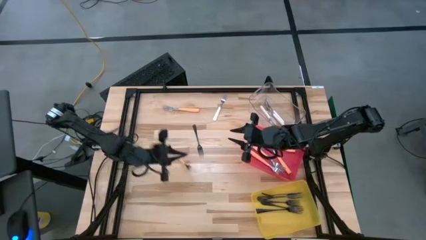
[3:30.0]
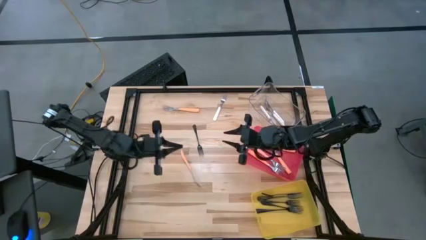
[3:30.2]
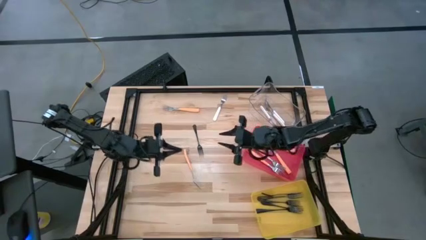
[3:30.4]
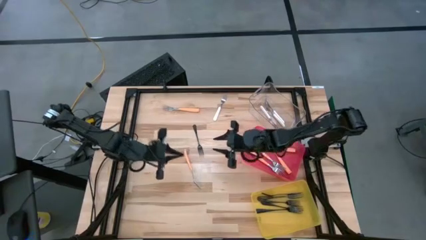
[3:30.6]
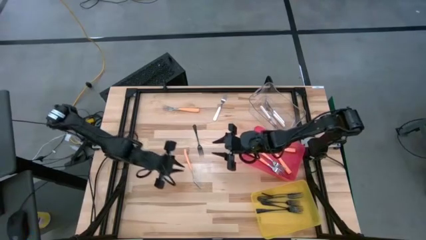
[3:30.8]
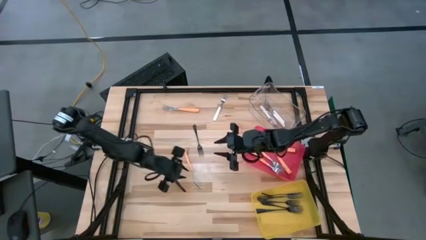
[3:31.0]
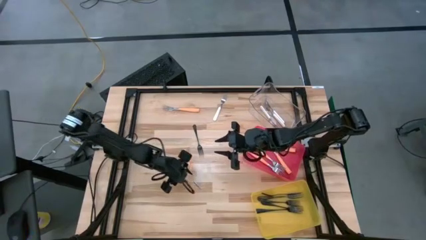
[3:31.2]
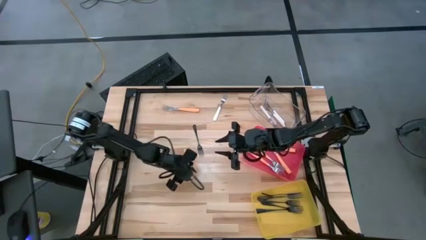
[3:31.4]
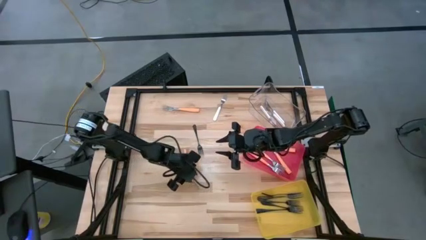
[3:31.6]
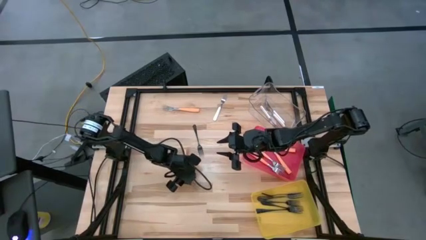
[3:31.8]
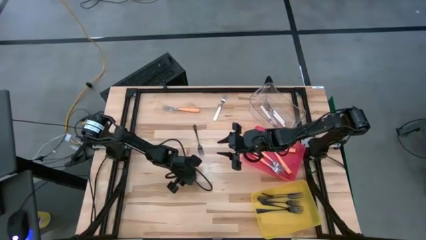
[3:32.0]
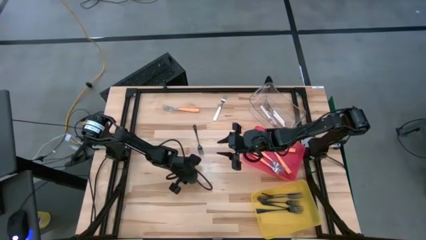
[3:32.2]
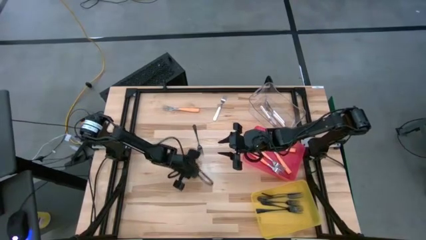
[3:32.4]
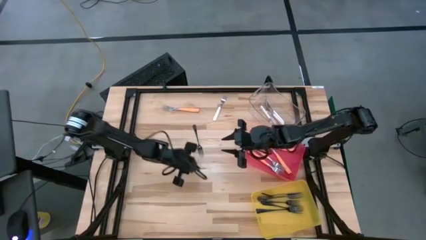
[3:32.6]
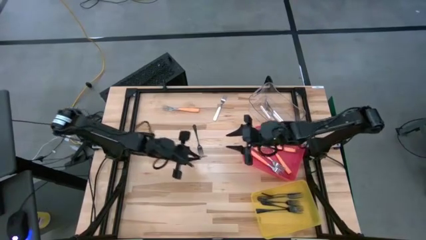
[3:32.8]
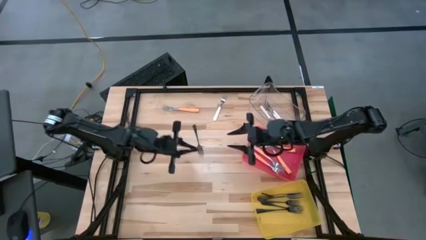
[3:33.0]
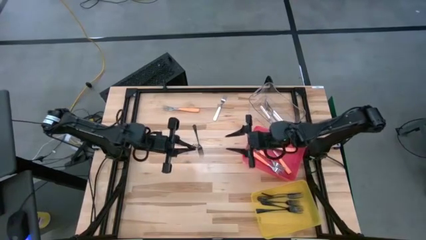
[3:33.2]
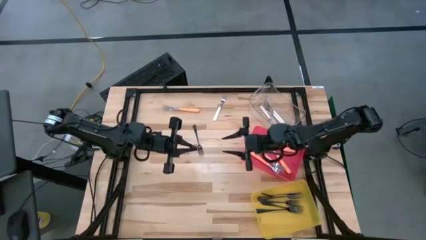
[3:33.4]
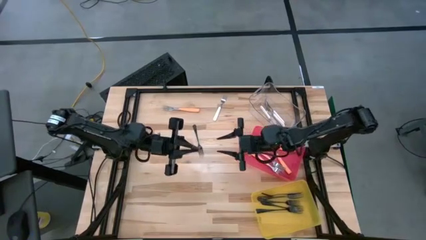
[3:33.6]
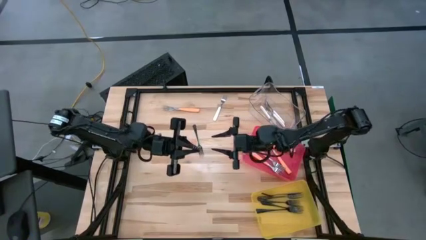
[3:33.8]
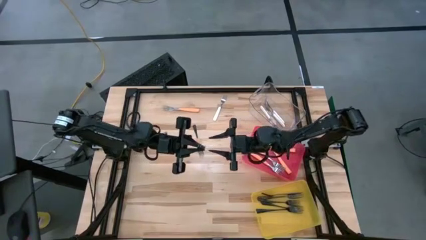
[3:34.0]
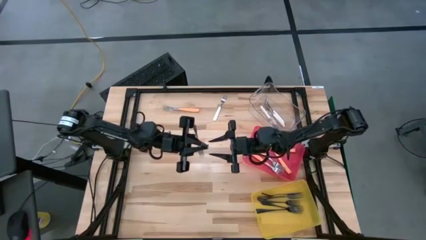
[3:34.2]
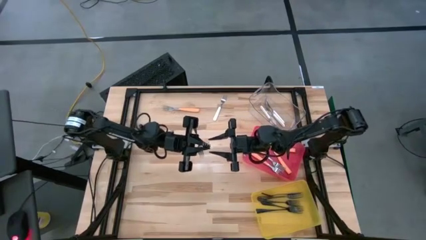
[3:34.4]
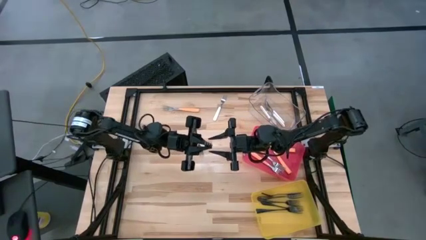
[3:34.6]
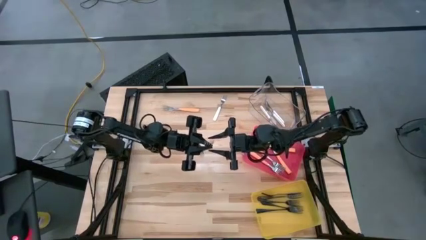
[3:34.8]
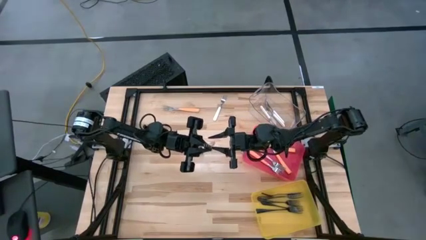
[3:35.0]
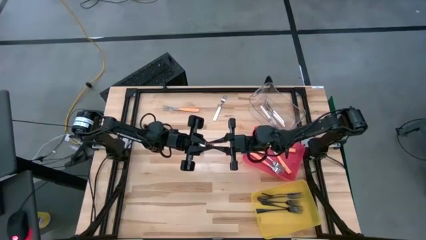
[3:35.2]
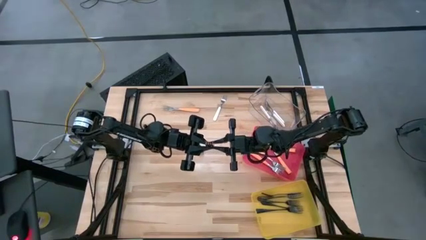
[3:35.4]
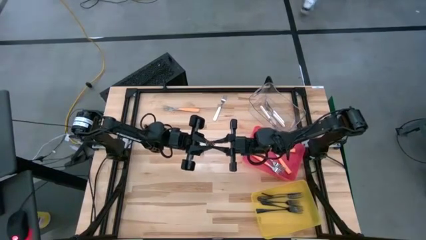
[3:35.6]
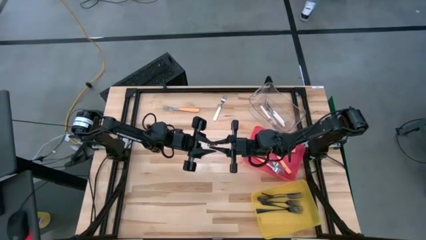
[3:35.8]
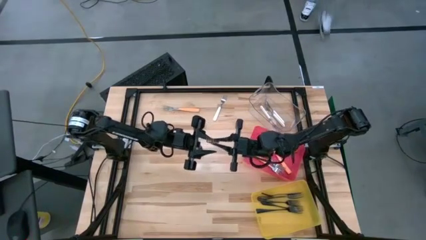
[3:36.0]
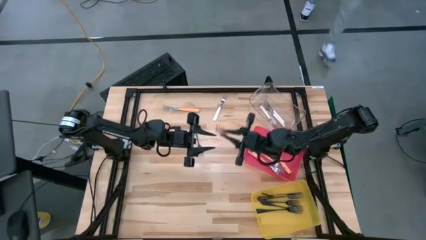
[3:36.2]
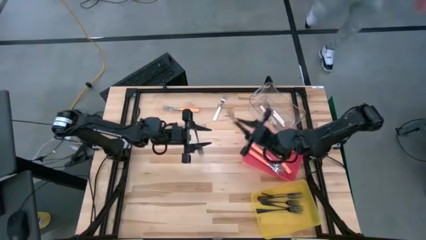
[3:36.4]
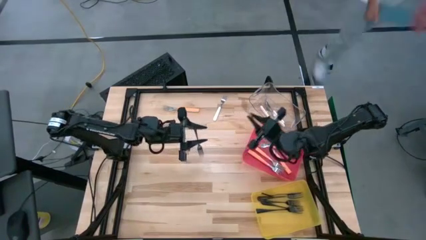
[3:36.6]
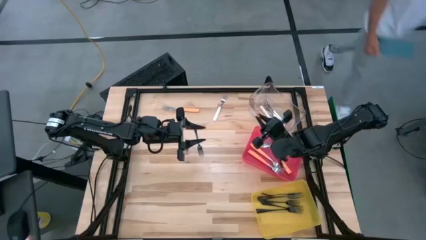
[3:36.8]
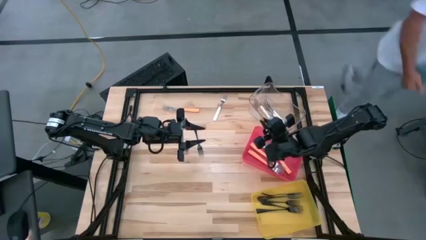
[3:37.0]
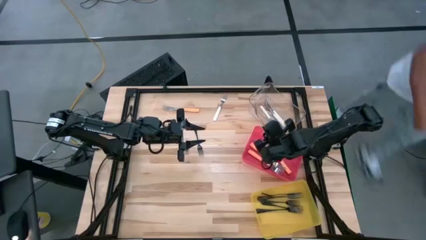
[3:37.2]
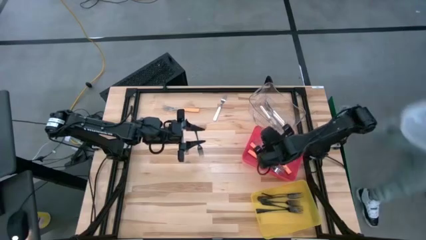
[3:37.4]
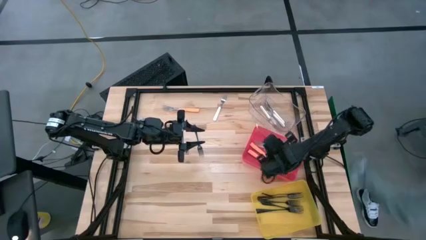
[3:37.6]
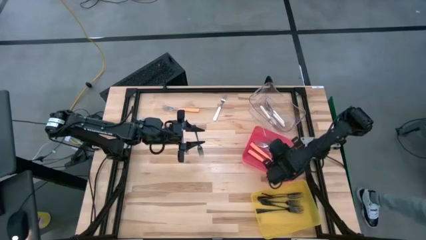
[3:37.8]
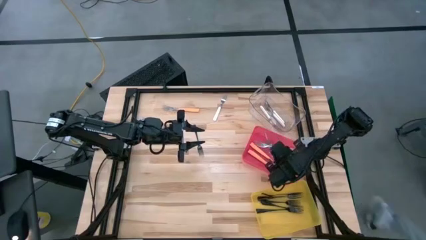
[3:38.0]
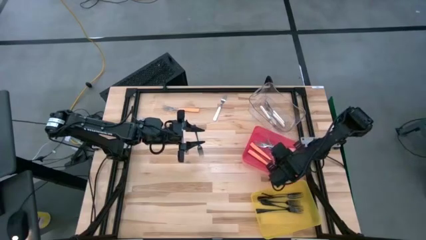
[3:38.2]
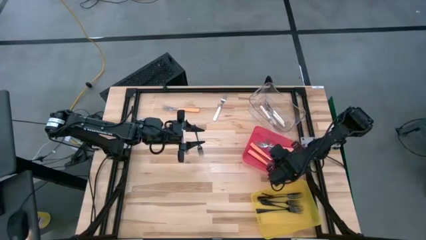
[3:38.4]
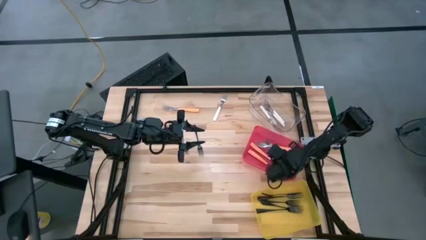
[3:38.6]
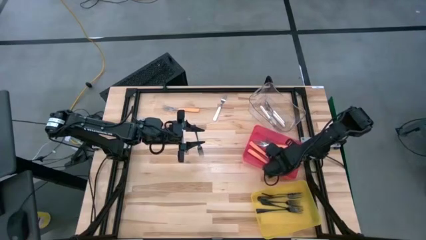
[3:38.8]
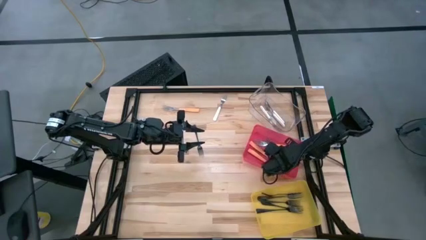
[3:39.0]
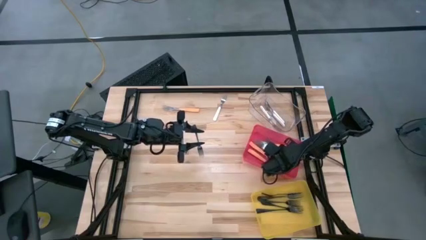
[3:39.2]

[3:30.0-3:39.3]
Task: Sort silverware by color (type)
Put the orange fork into the red bin

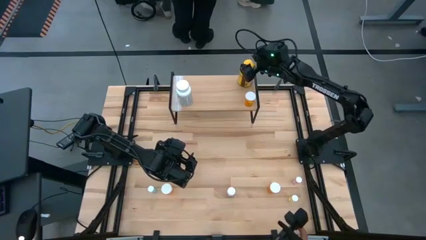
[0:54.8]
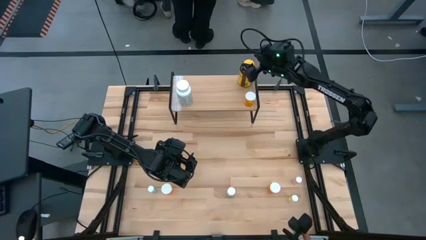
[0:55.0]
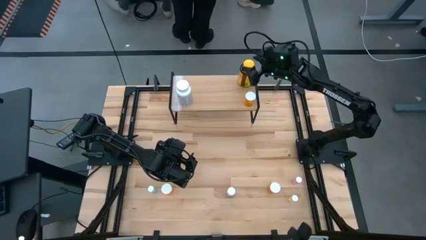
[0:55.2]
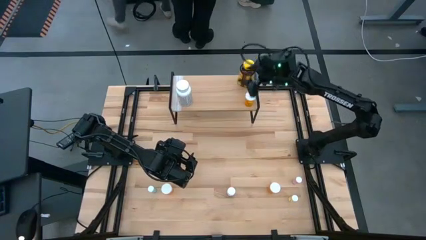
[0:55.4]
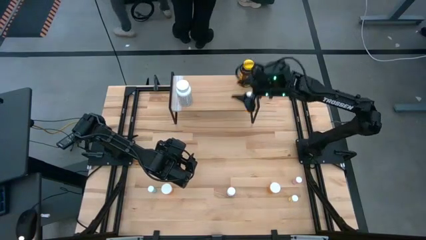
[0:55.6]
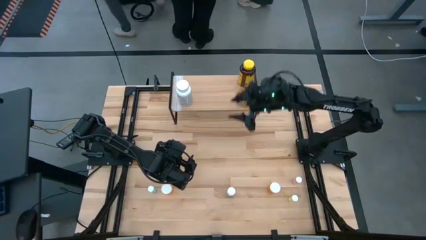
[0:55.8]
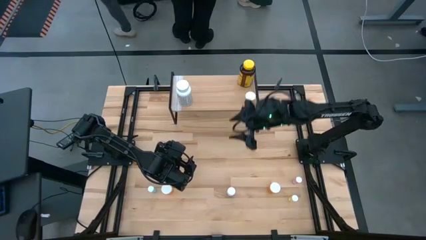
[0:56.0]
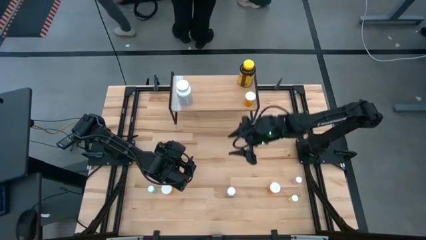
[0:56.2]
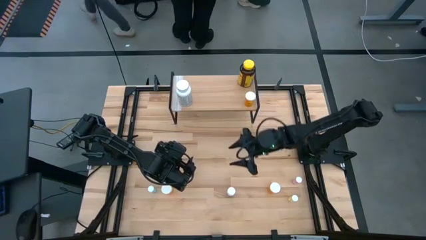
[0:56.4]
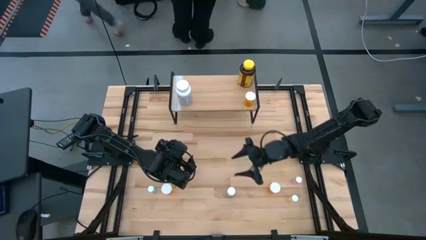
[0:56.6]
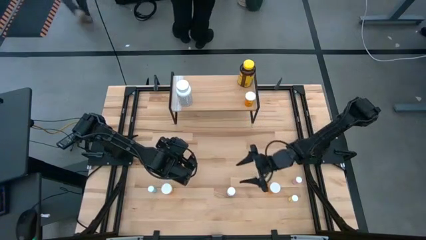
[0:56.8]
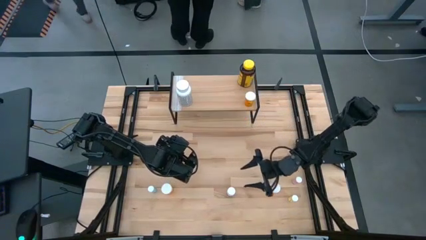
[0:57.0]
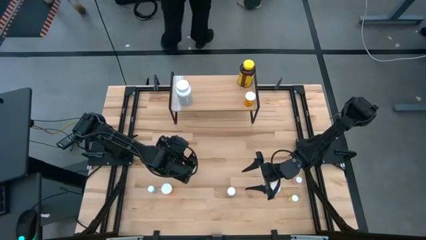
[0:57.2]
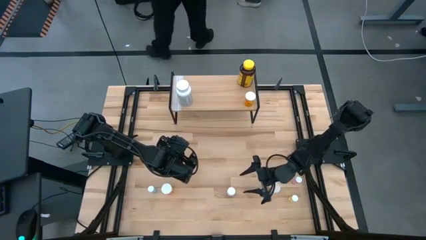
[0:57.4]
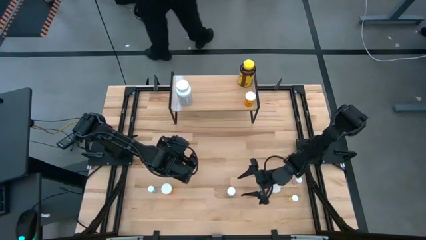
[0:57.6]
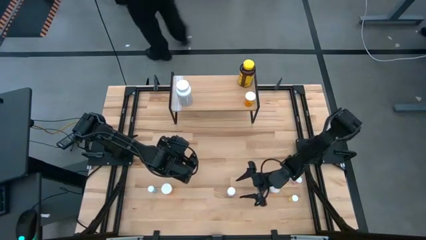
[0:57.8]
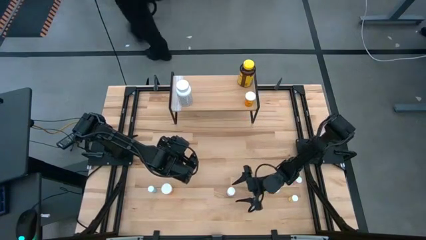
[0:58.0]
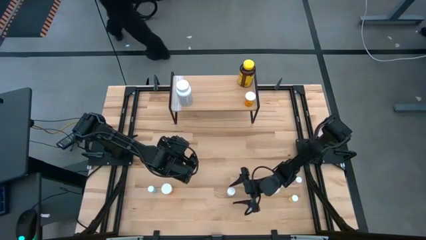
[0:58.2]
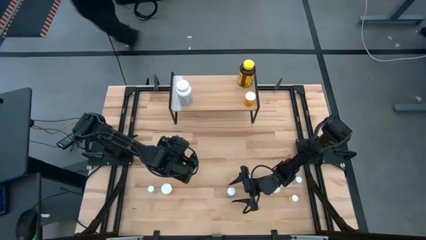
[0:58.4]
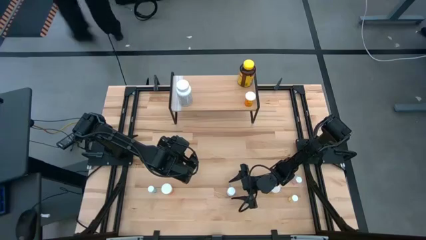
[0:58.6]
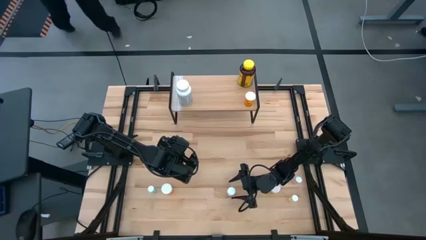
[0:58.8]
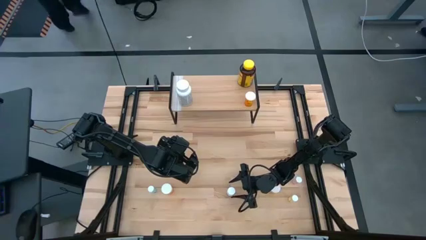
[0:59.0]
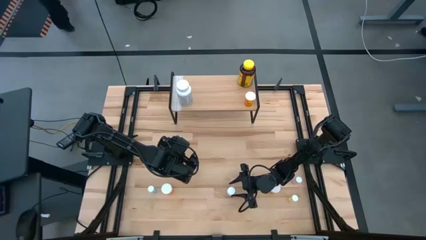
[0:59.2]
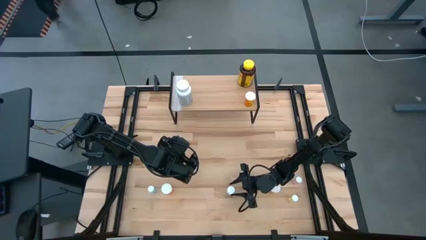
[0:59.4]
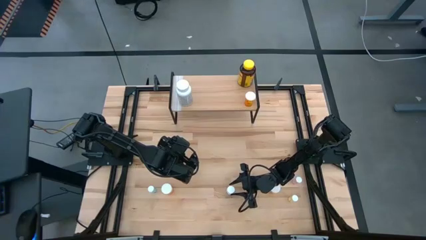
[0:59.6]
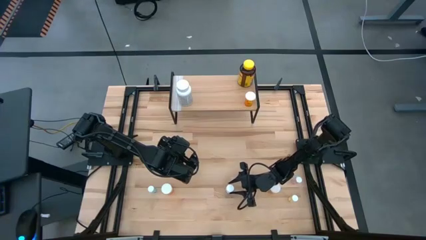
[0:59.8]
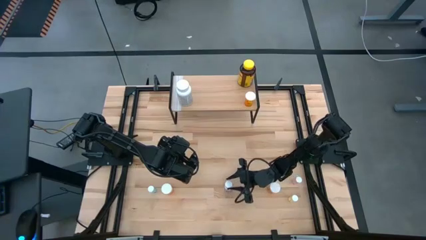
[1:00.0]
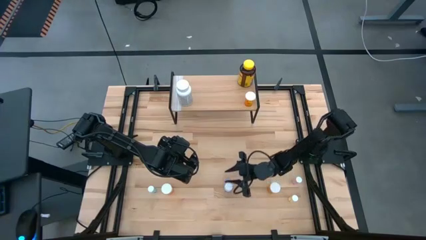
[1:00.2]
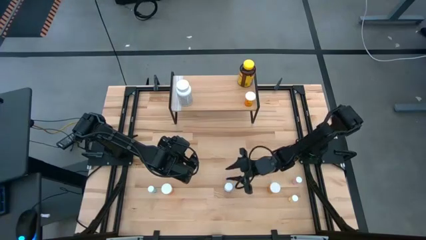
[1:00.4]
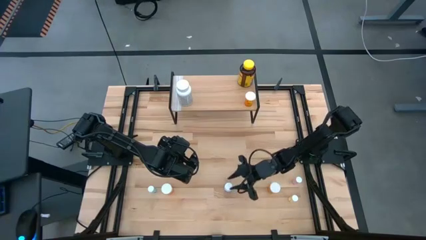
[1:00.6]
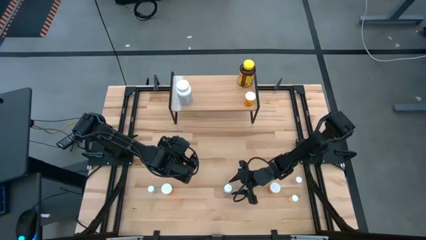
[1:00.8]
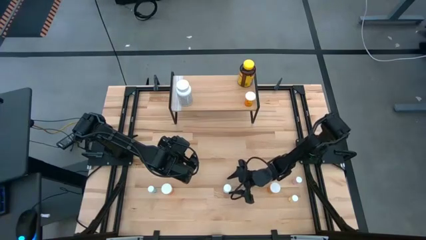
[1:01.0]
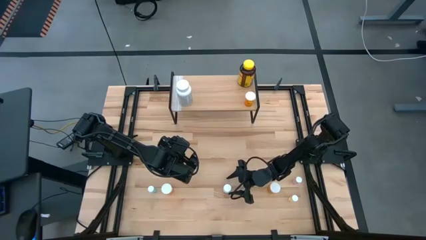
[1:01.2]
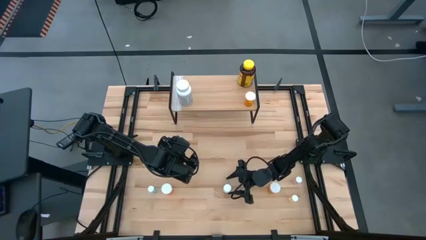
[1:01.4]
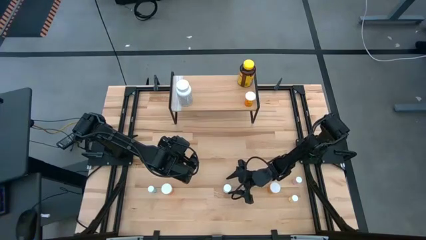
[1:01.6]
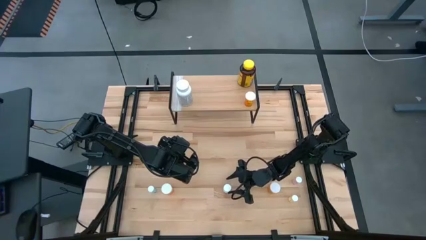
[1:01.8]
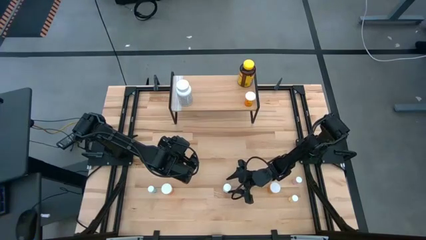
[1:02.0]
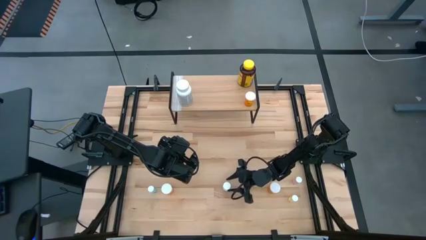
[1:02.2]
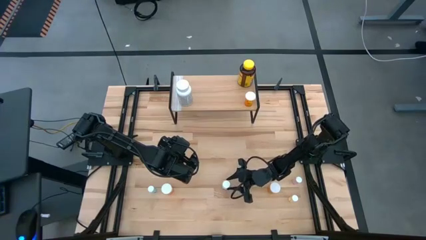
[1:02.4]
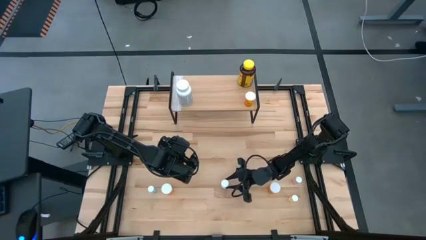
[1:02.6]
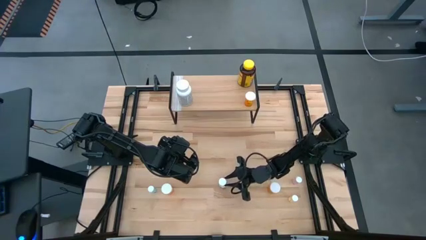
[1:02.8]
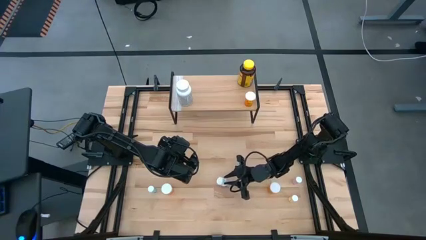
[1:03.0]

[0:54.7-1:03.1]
Task: Pick and place medicine bottles onto shelf by color
Put the small white medicine bottle on the shelf
